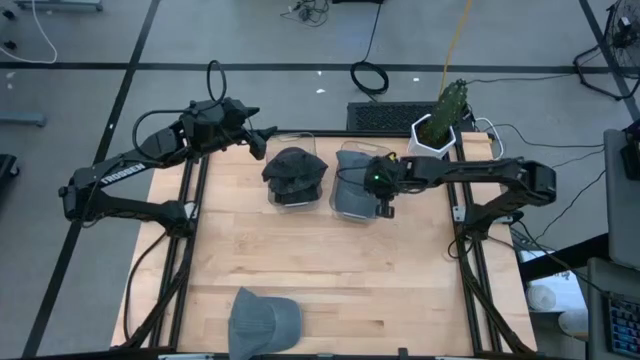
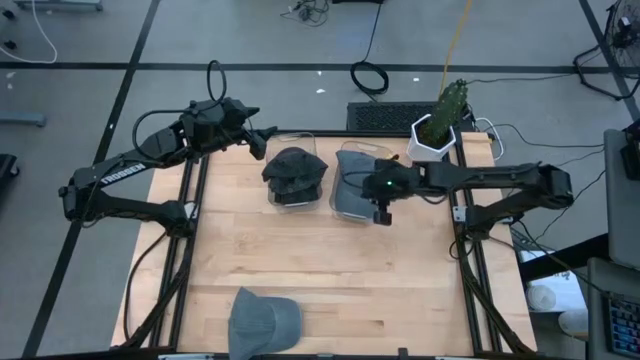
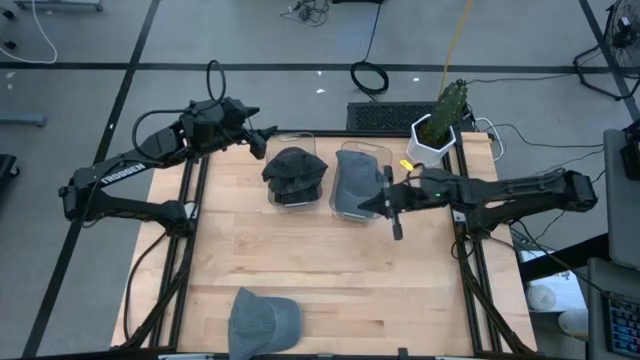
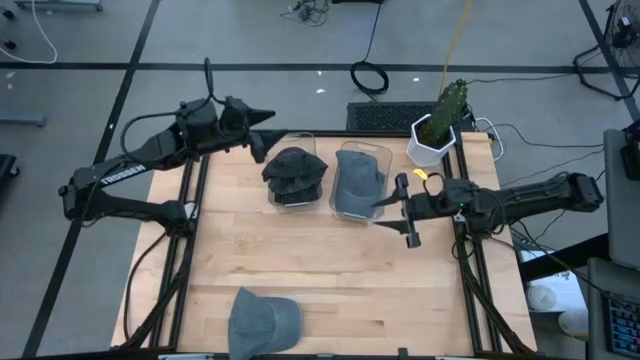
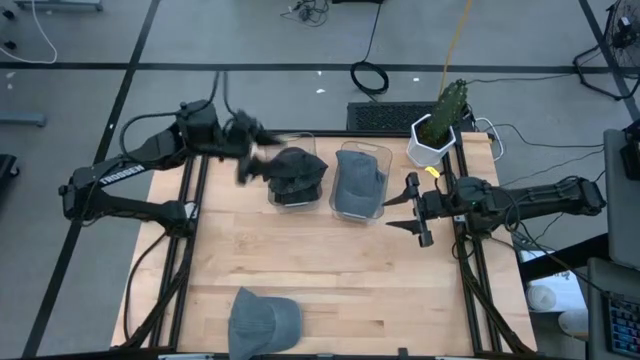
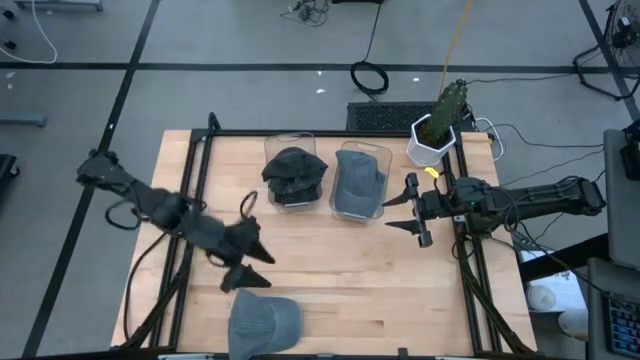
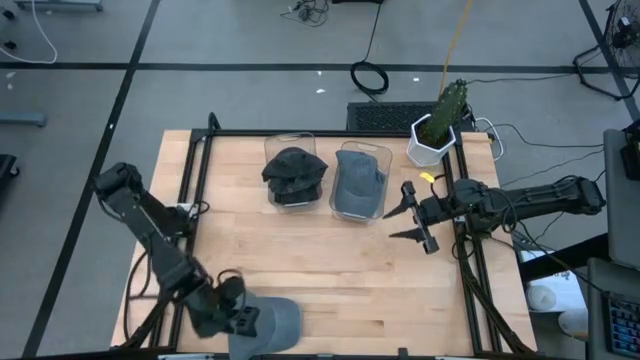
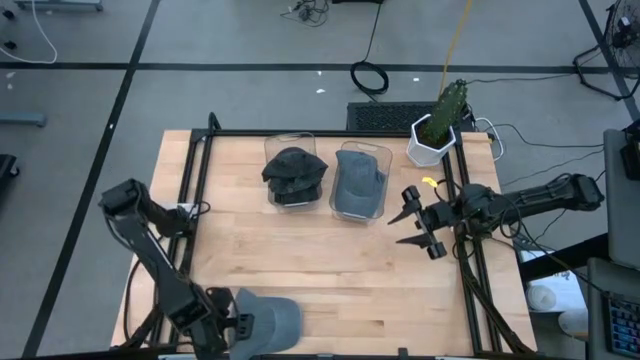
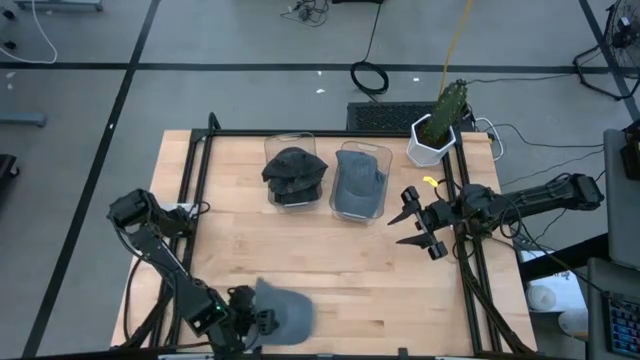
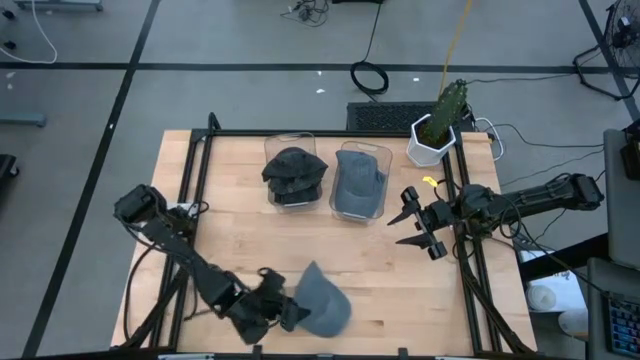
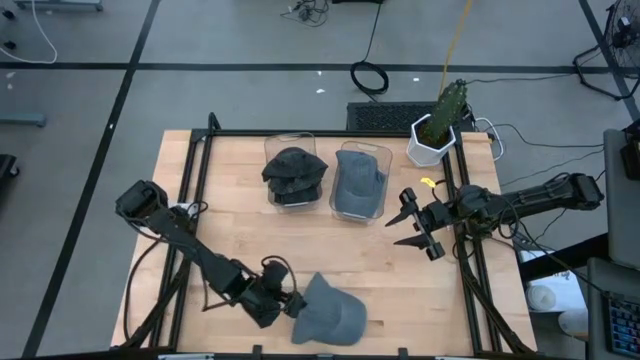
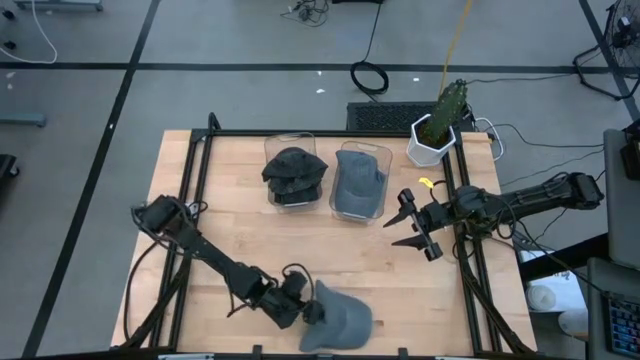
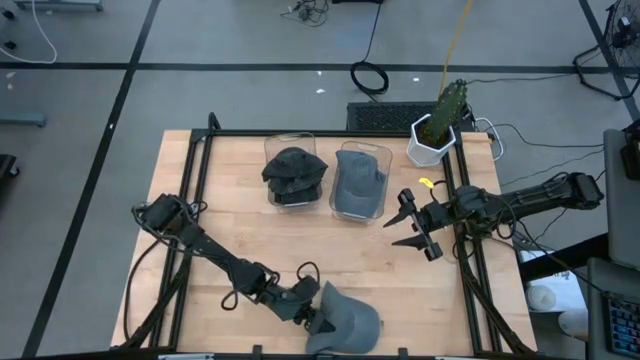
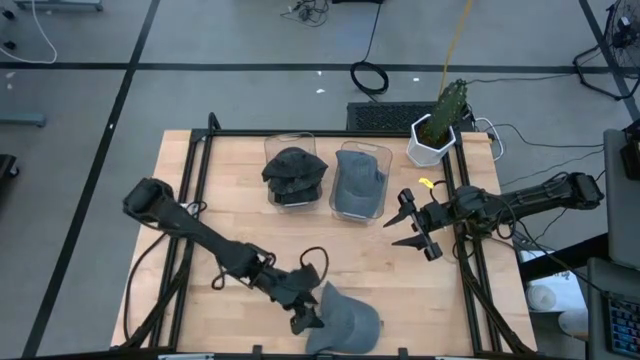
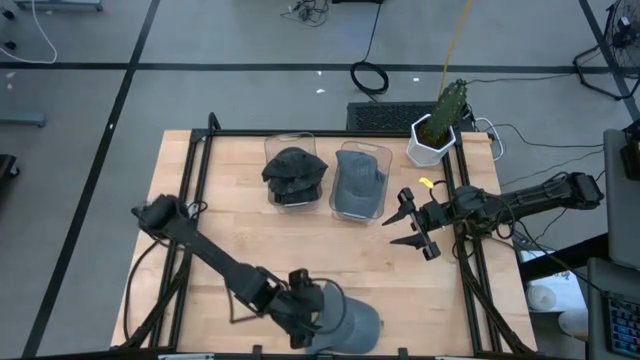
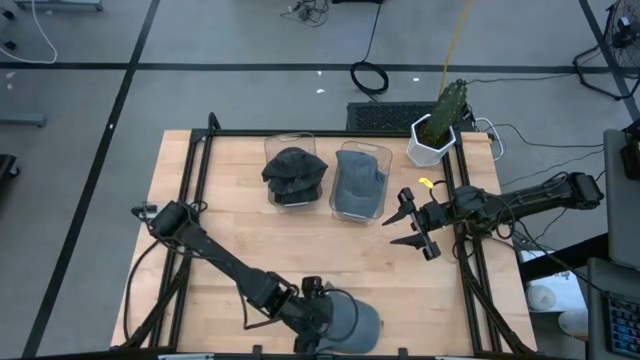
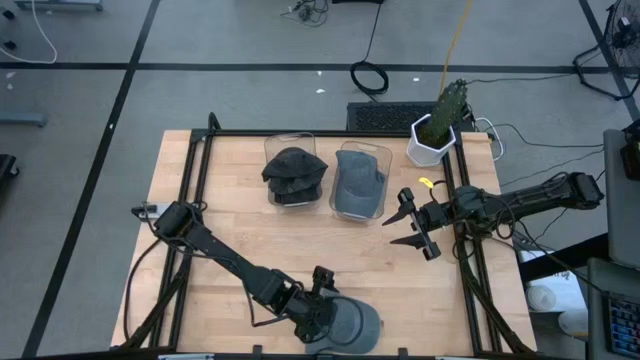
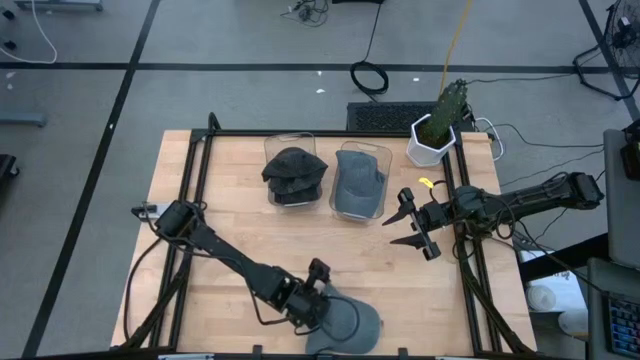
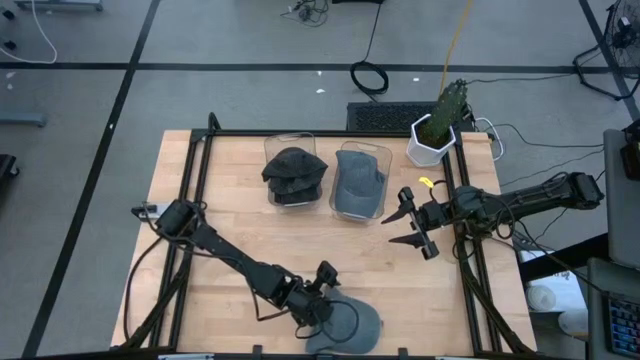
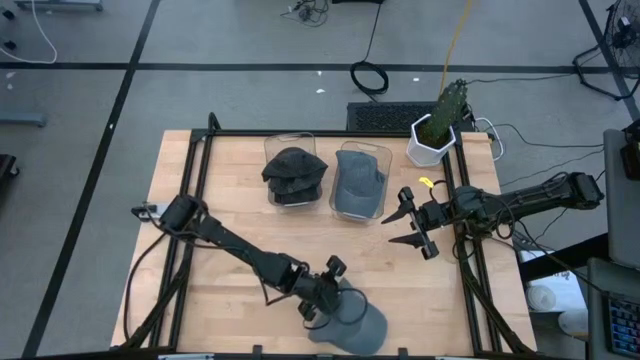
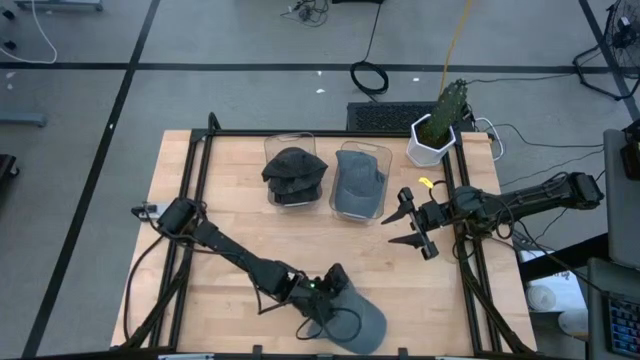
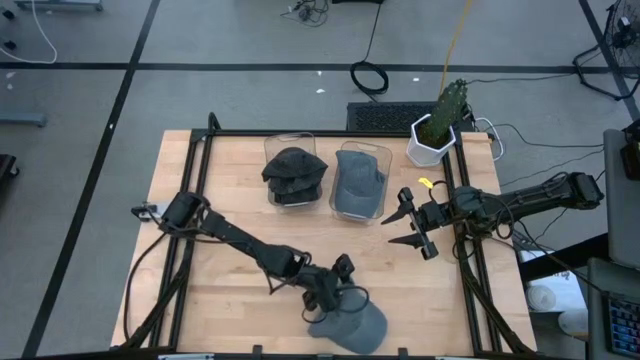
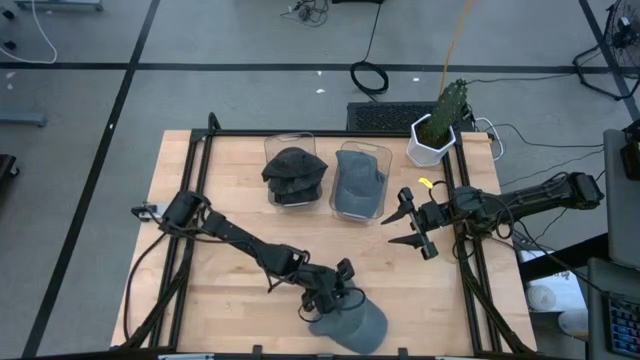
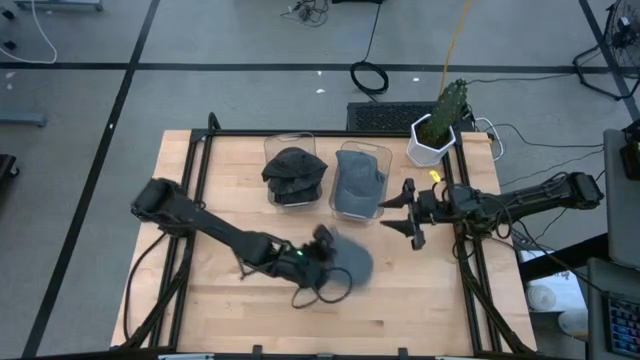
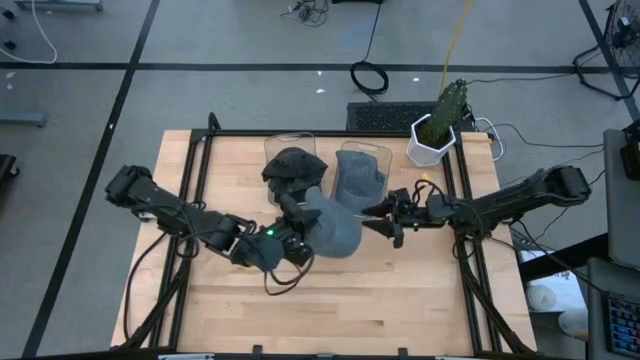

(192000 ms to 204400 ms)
Task: Pick & Place hat
Put the gray cap into the right transparent bin

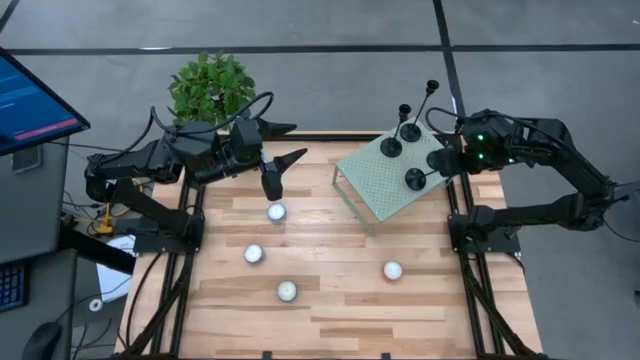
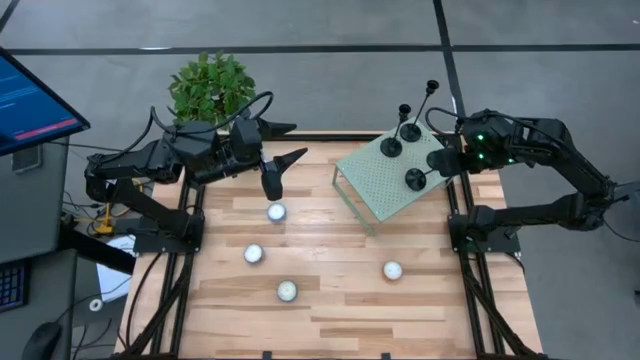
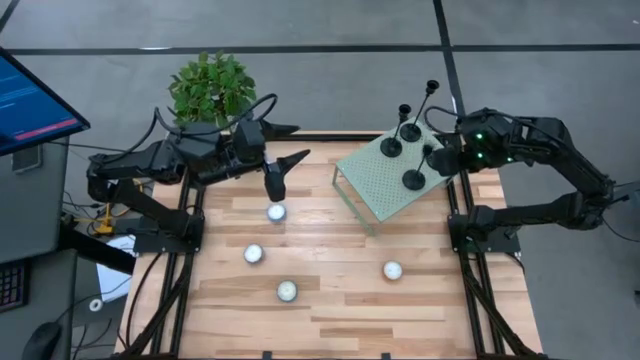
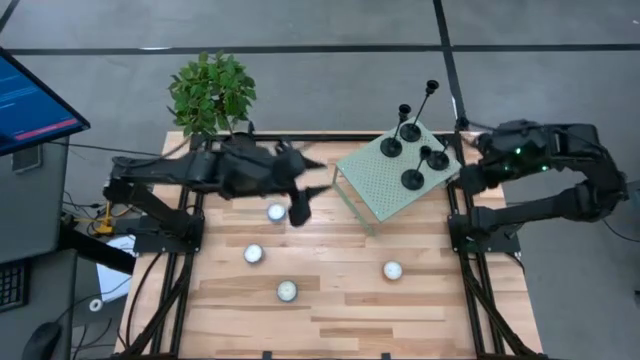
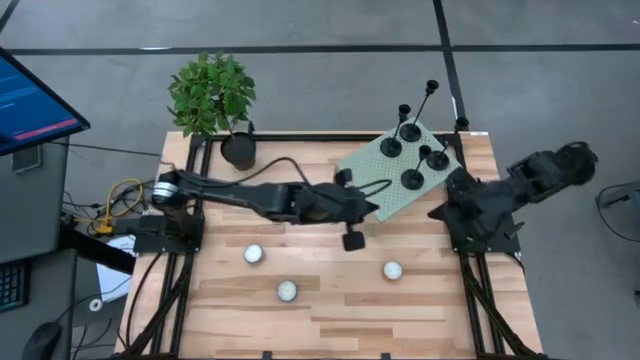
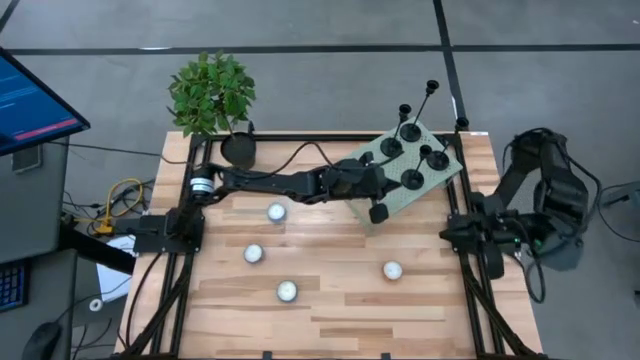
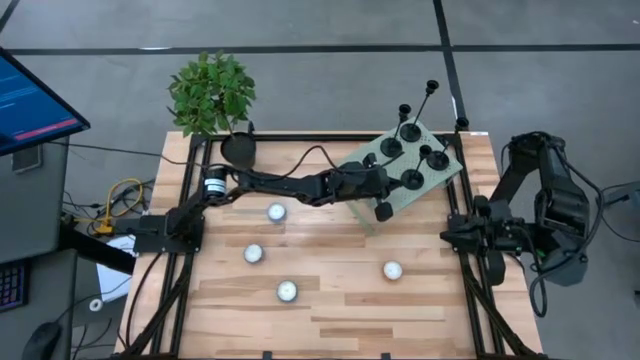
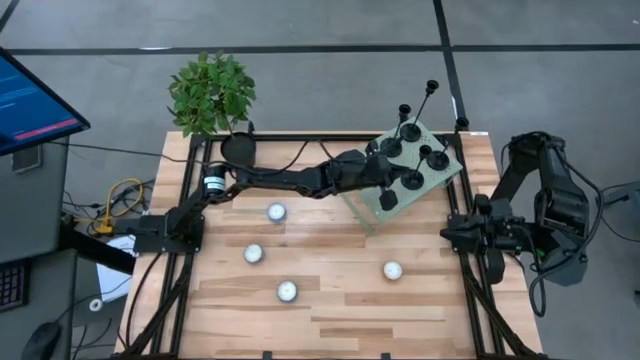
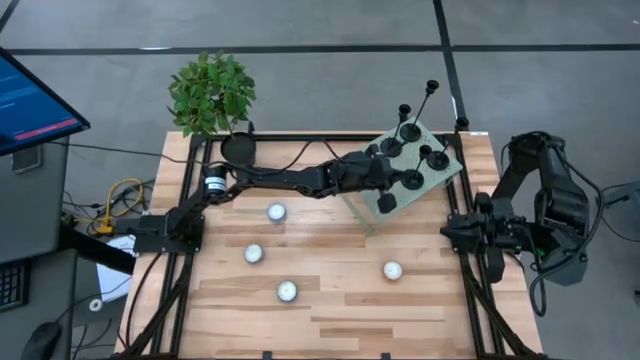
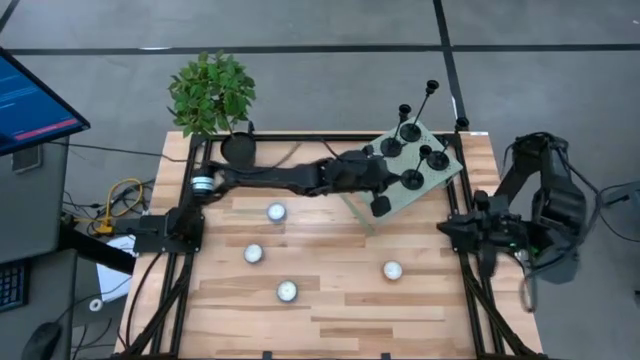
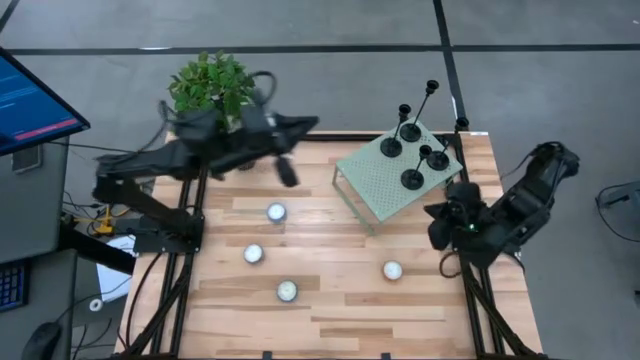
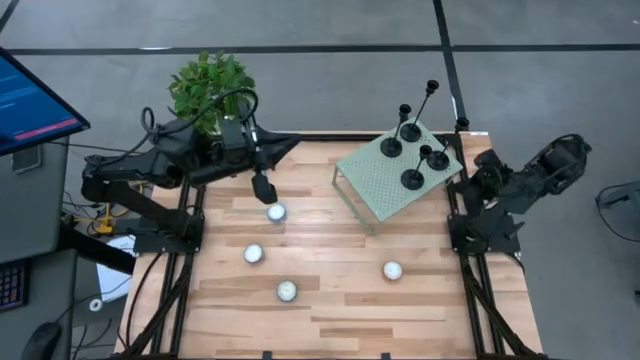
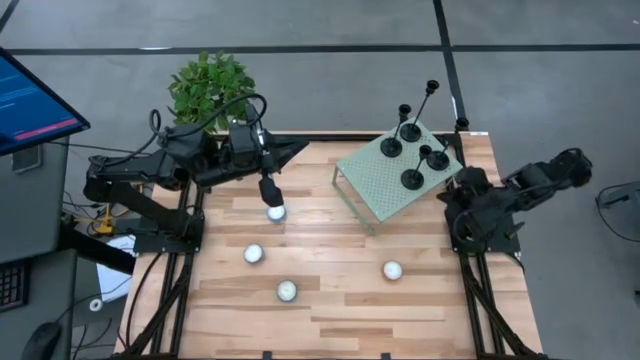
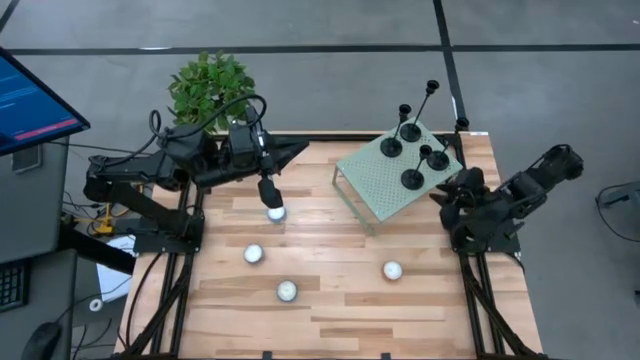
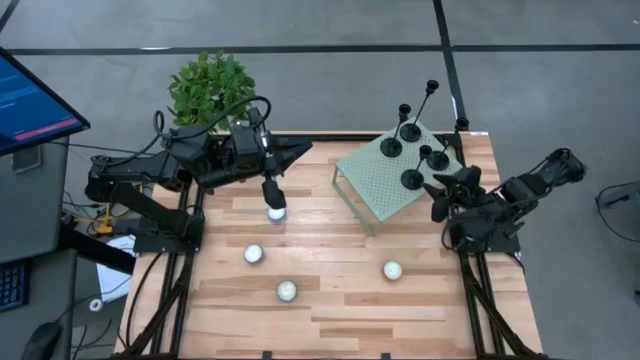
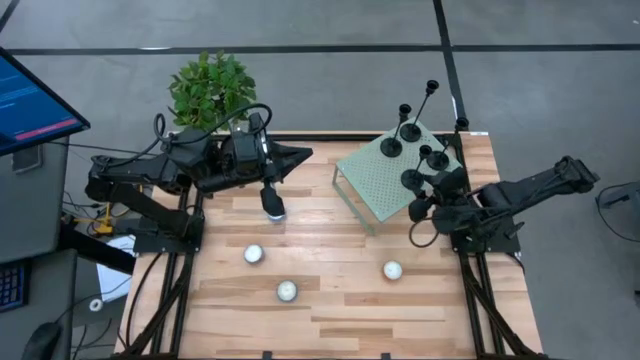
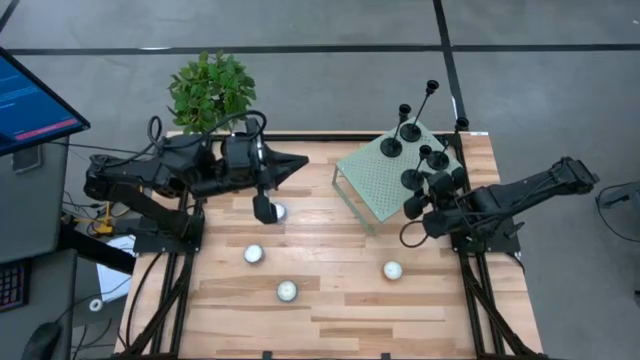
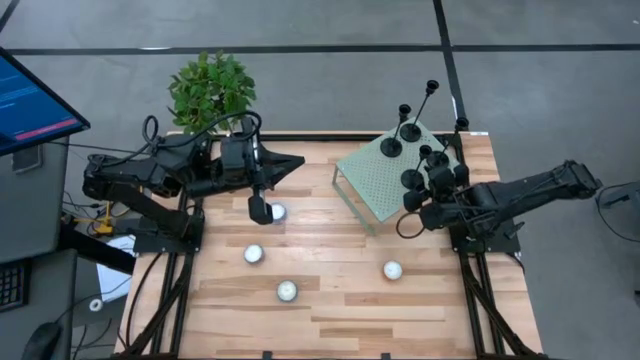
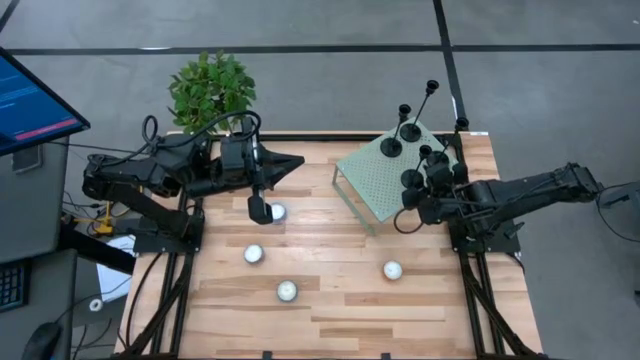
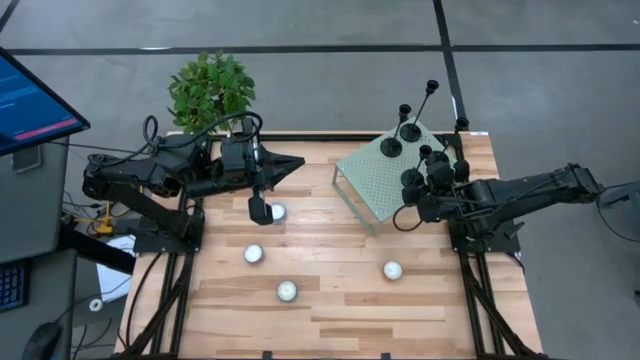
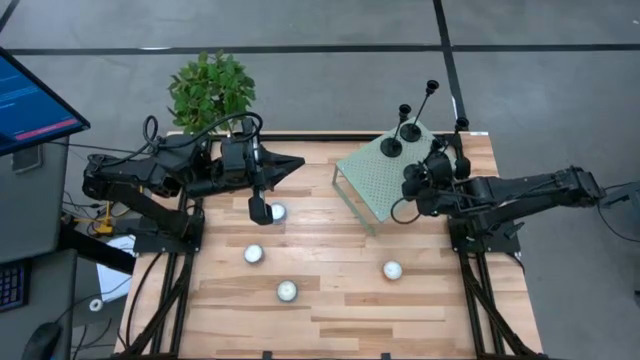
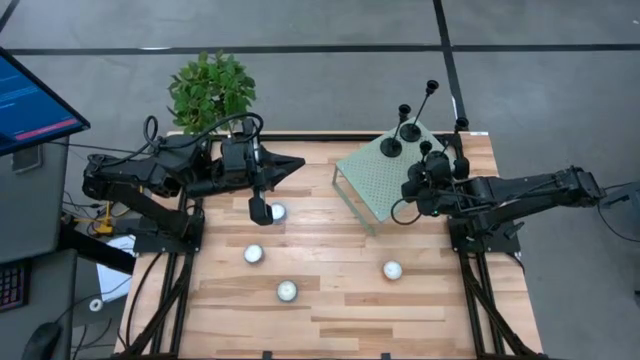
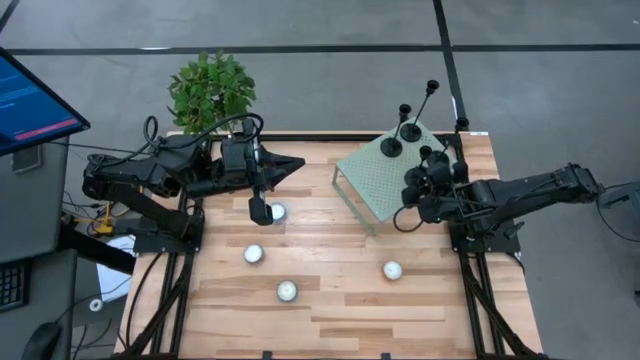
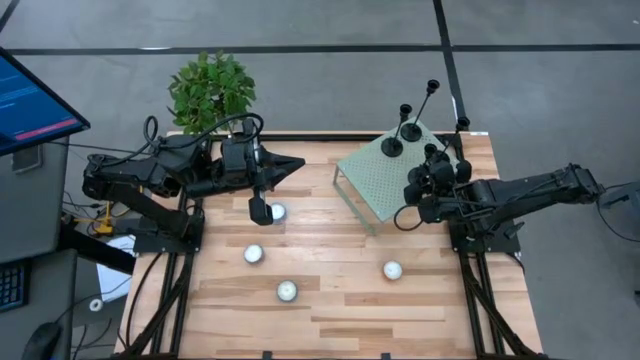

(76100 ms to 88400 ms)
Task: Pick & Place candle stick holders
Align the black candle holder with the bottom left black candle holder on the shelf
